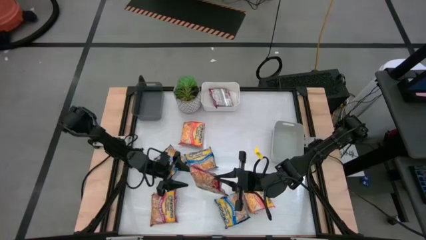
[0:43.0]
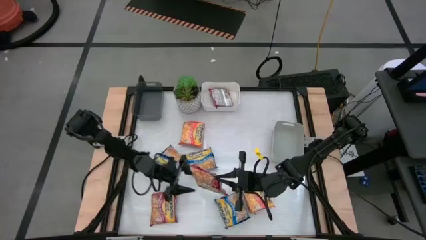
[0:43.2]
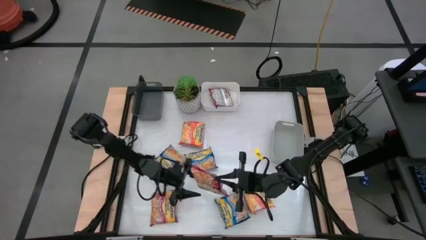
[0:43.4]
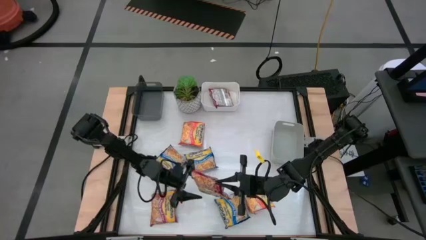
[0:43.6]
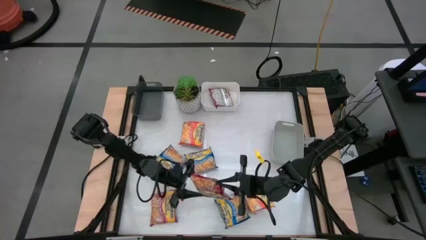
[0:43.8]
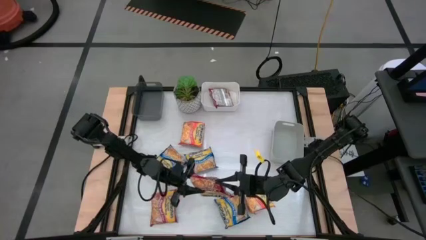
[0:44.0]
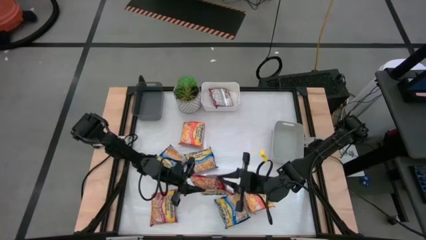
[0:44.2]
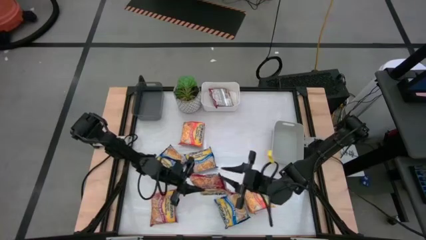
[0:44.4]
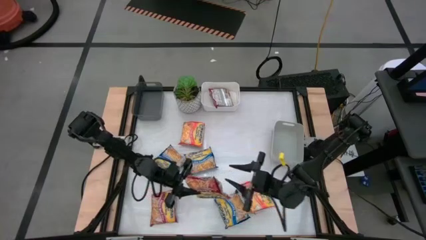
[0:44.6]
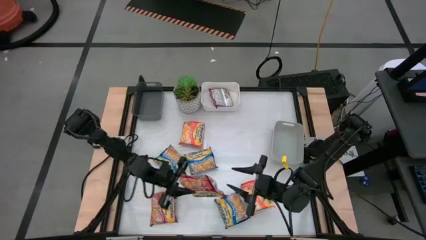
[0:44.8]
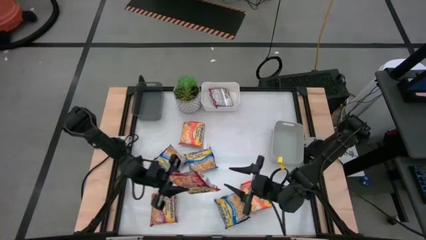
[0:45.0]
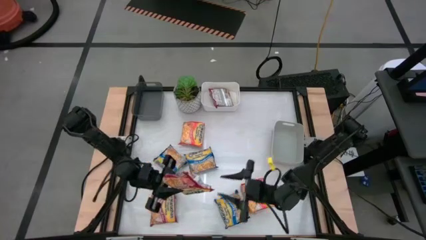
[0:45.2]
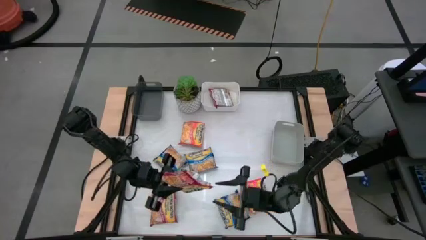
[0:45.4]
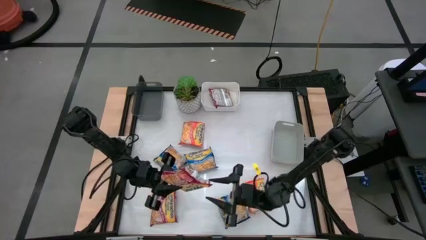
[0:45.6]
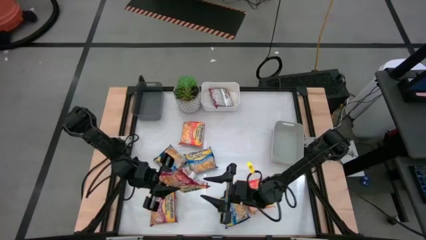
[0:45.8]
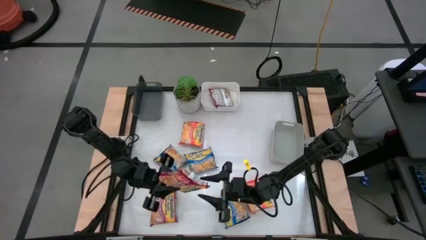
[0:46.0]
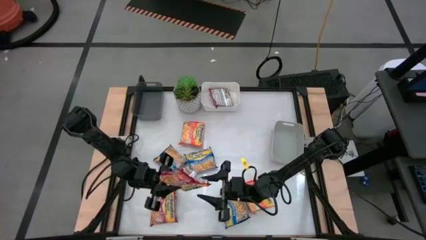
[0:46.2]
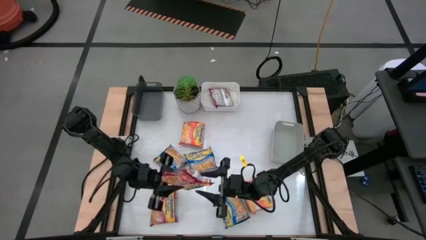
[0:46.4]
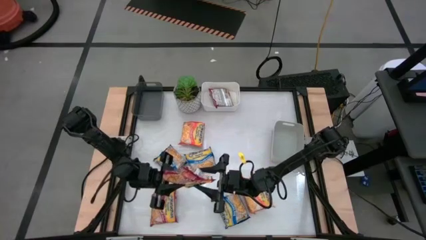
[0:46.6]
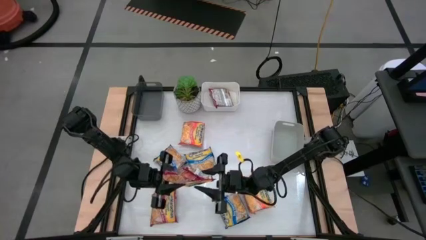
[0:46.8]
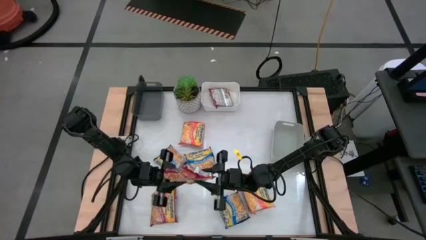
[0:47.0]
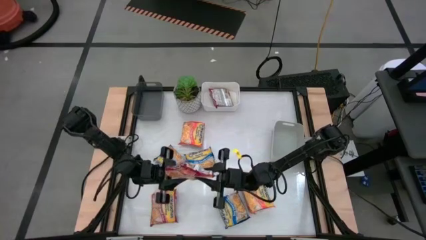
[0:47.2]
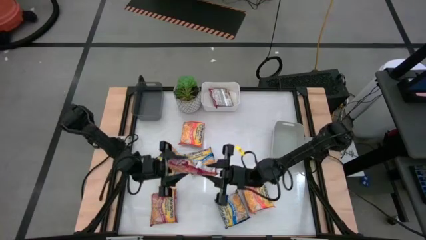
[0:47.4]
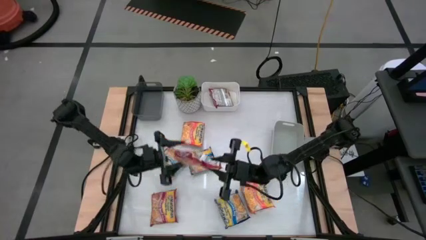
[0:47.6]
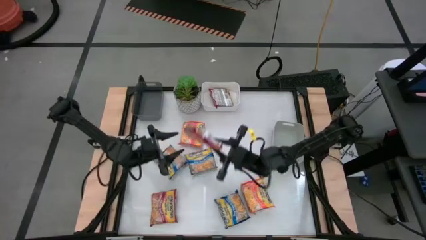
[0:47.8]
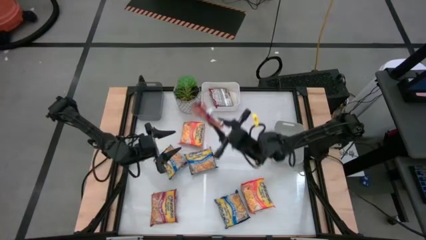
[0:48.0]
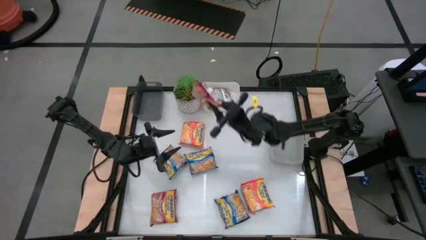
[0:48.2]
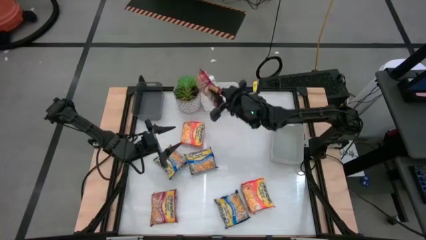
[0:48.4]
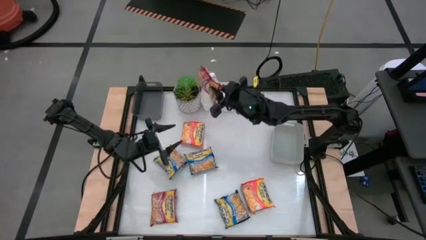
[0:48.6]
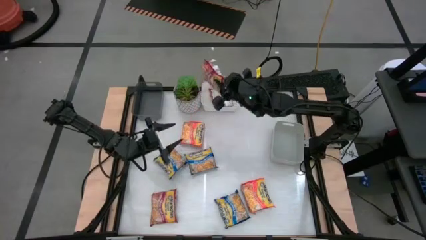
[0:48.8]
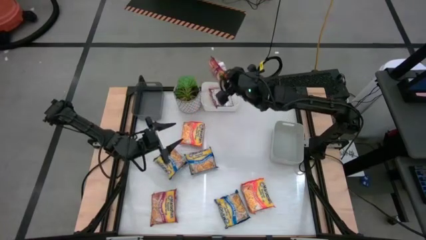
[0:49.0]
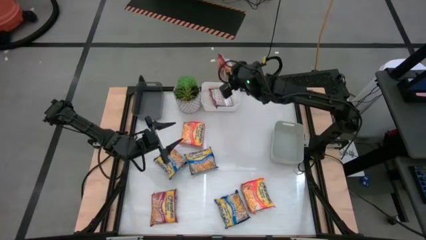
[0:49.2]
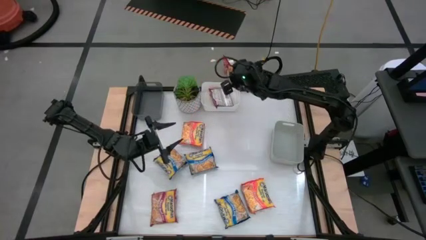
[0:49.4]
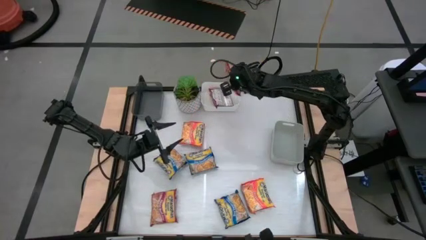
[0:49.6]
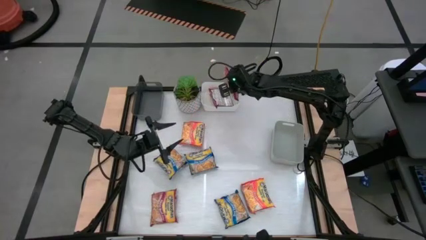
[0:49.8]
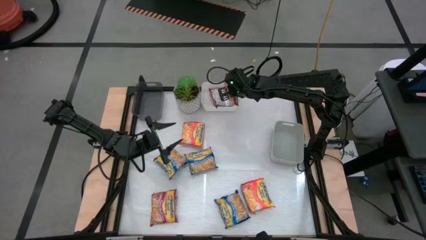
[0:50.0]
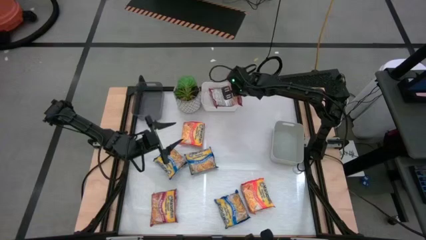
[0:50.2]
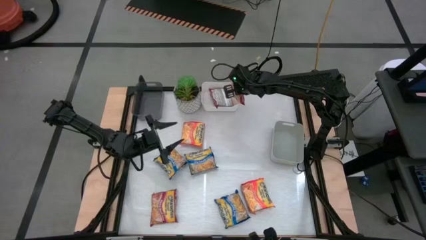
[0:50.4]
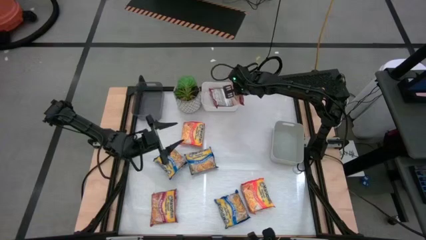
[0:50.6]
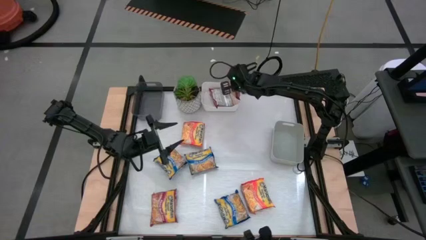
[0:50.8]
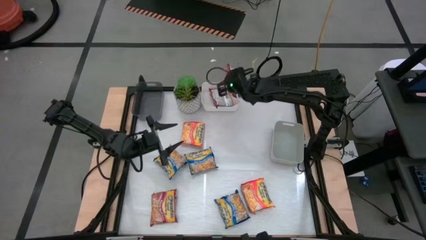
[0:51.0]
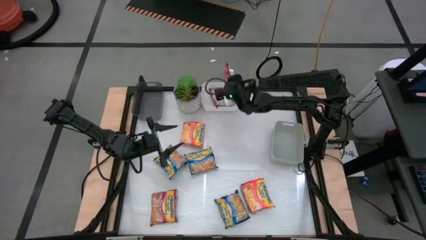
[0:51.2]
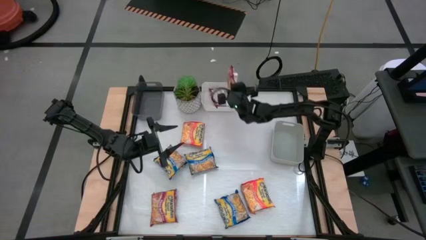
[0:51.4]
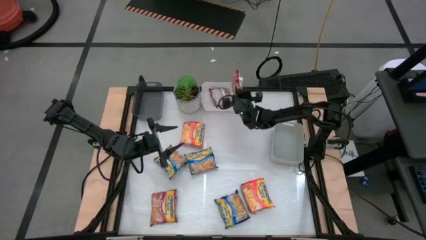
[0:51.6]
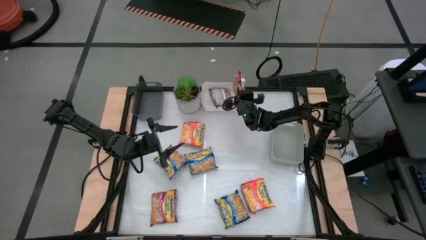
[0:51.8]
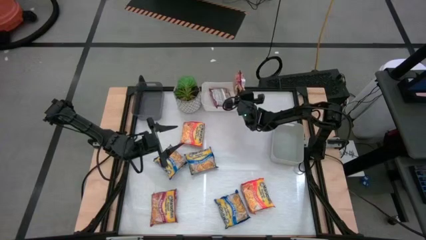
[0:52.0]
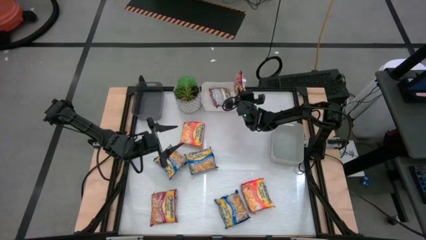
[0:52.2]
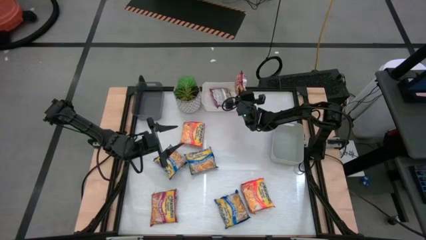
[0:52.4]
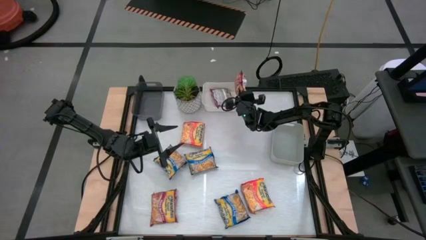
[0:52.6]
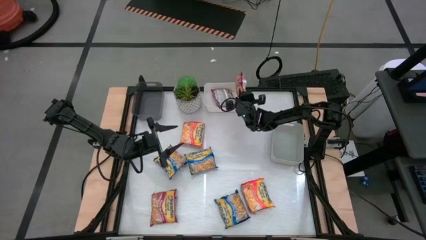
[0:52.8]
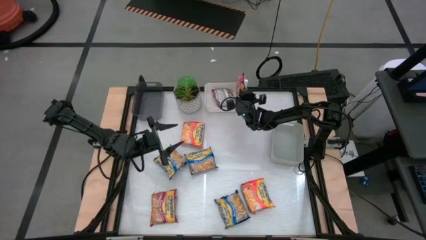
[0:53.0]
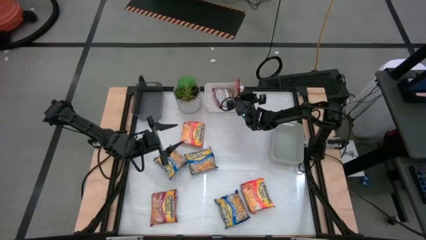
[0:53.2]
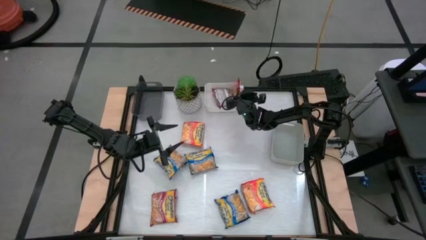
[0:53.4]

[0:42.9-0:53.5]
Task: Sort Maruchan noodles
Put the right red noodle pack into the white bin

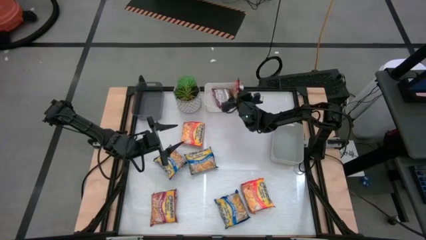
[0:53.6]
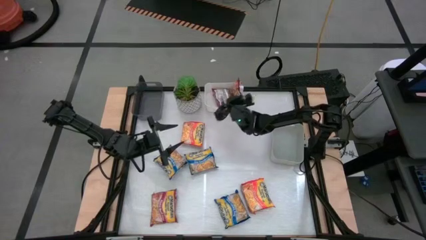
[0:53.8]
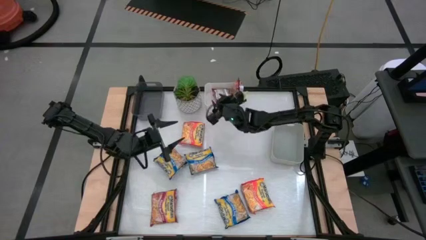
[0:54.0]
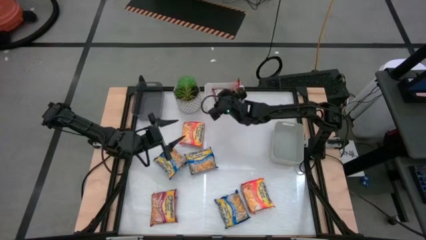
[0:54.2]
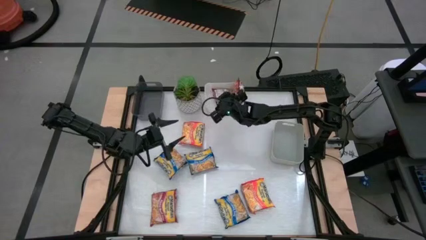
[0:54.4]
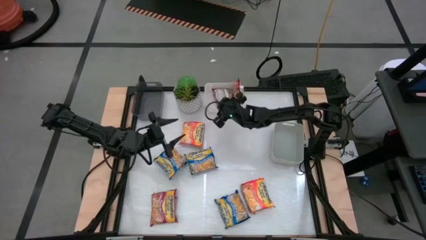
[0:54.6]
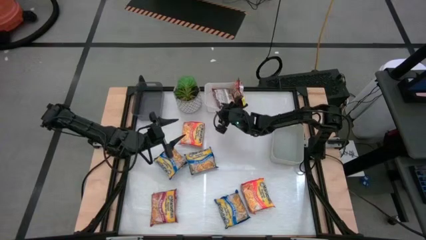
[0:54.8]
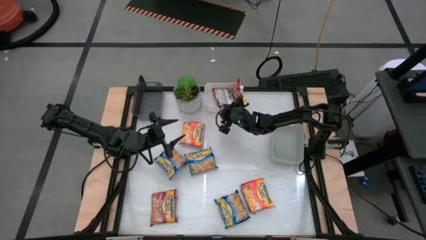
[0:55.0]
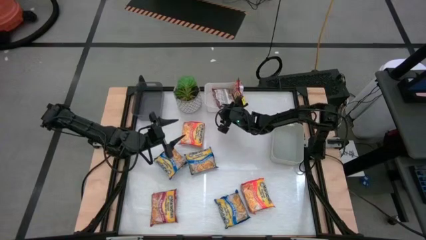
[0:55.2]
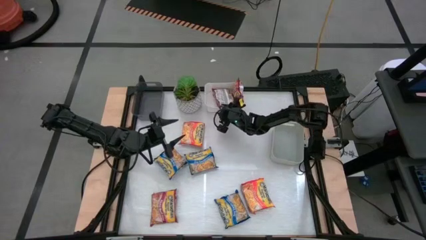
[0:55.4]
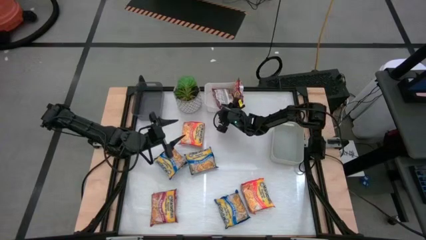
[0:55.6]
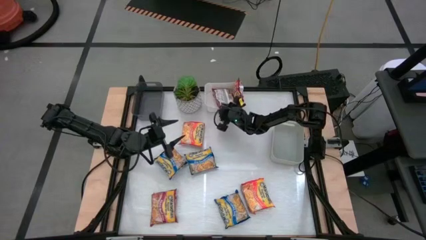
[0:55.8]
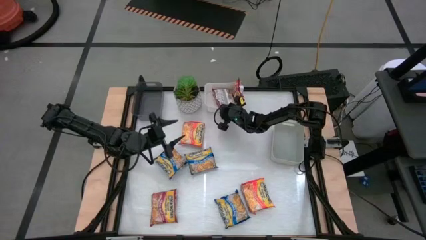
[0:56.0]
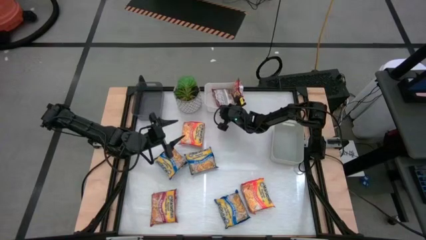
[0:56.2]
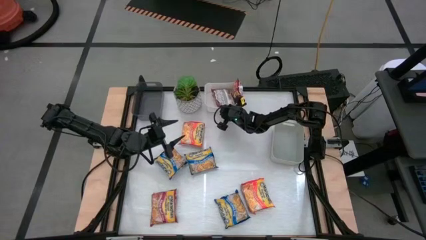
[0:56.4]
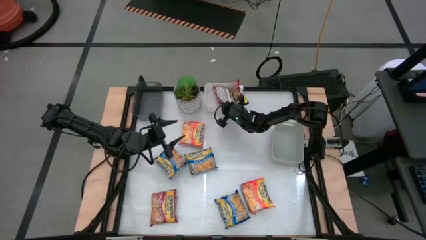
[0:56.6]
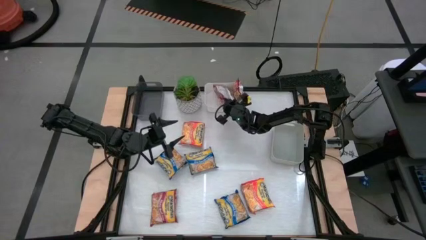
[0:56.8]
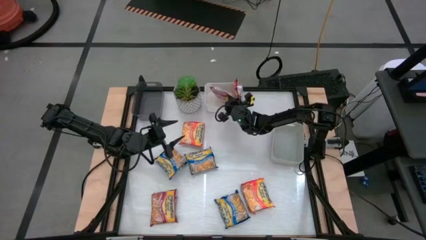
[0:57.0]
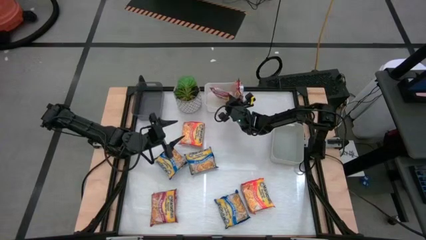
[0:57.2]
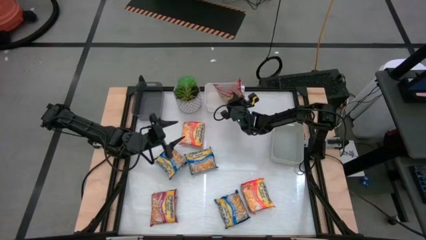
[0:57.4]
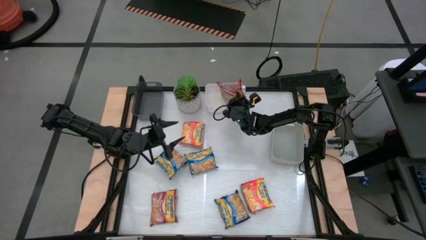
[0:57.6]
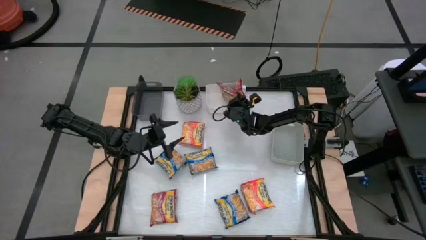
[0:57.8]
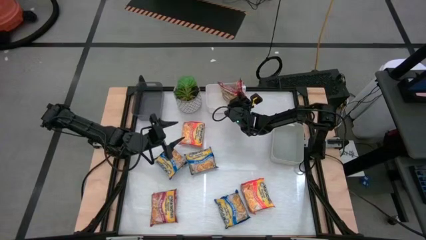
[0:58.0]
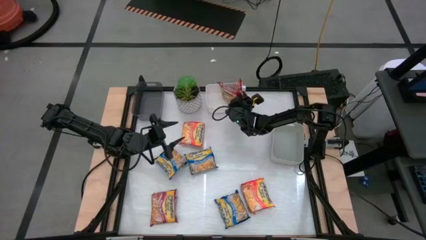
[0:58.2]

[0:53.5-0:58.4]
Adjust the red noodle pack

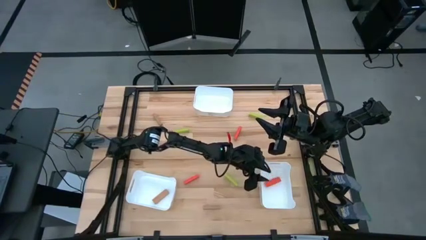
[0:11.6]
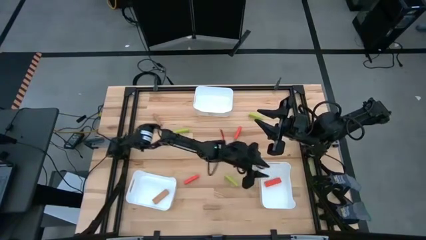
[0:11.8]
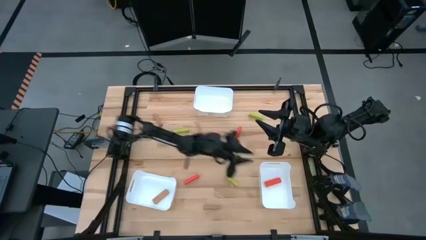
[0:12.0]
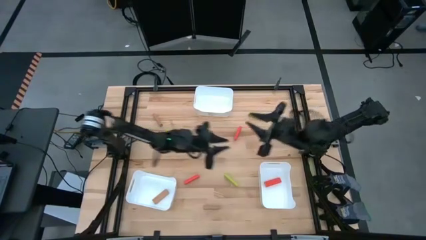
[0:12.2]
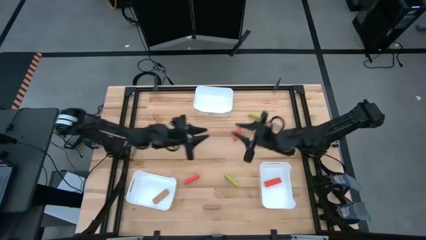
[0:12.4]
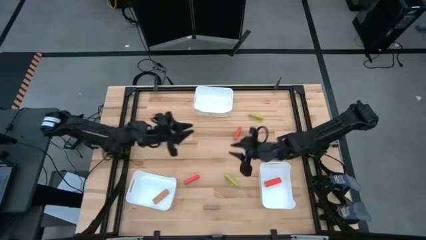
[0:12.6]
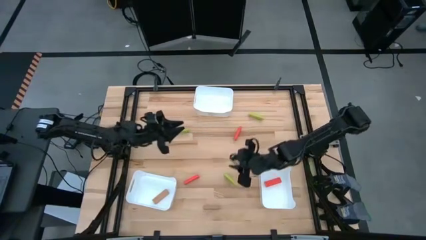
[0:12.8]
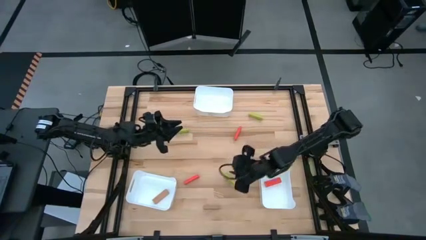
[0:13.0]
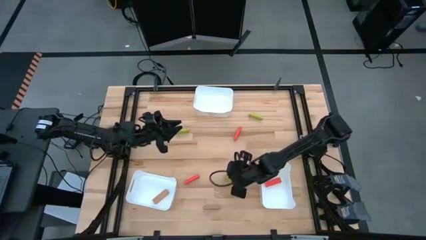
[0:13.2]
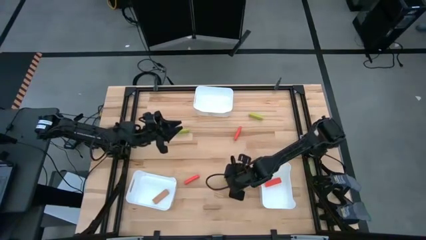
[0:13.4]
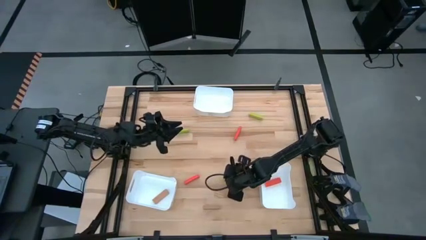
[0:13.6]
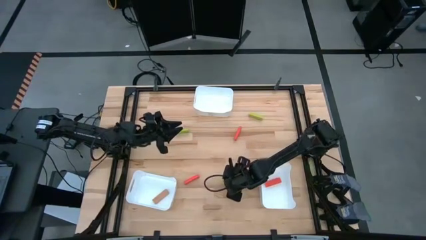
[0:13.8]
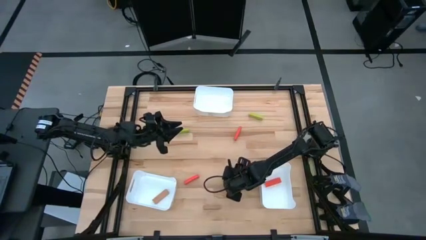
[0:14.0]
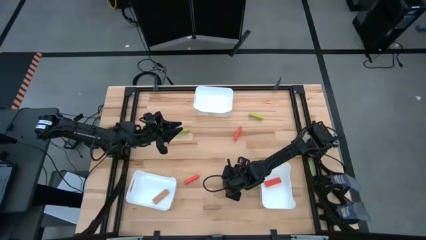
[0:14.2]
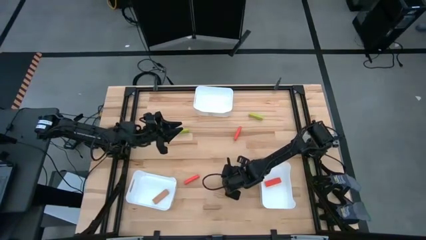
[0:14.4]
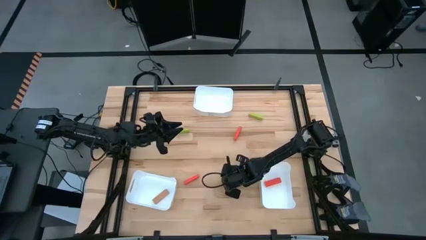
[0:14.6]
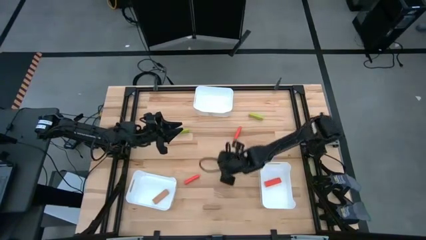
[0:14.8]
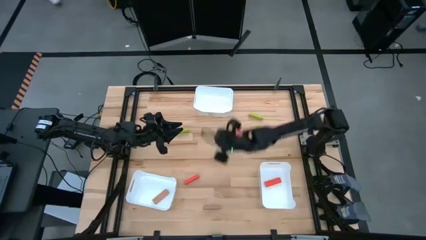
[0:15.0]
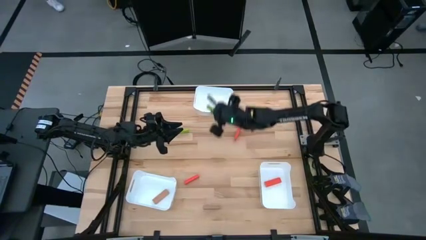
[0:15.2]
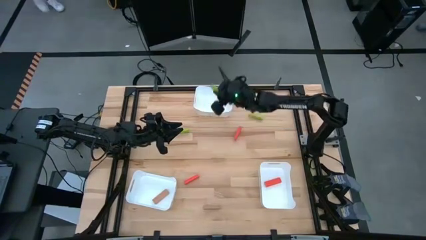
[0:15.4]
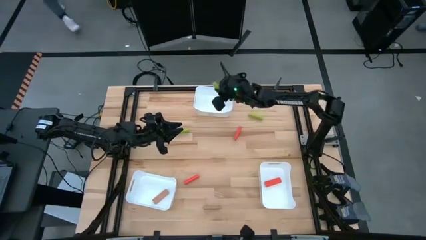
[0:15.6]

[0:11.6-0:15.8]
Task: Sort blocks
Put the bottom green block into the top white bin
